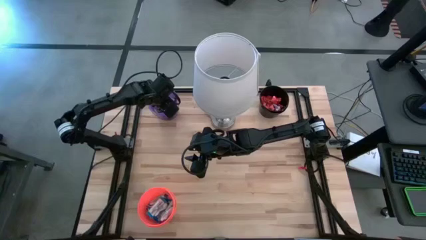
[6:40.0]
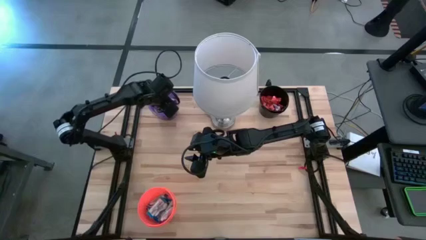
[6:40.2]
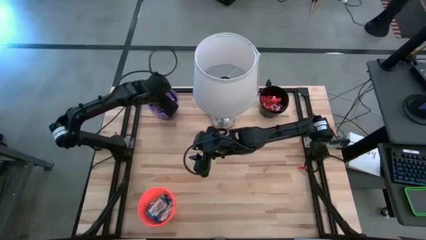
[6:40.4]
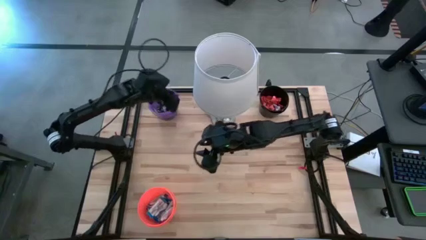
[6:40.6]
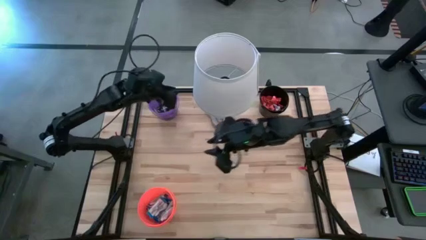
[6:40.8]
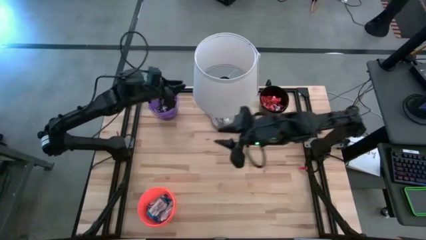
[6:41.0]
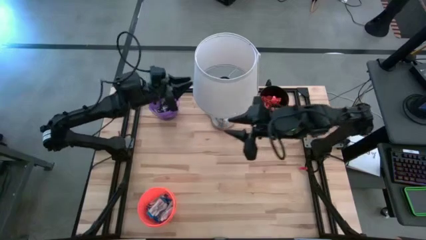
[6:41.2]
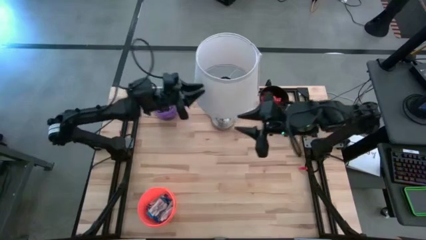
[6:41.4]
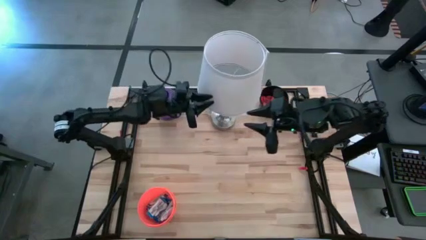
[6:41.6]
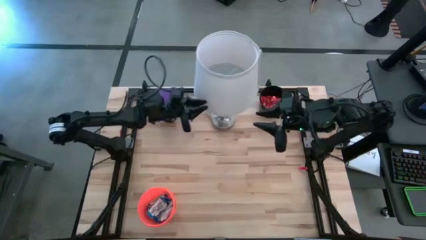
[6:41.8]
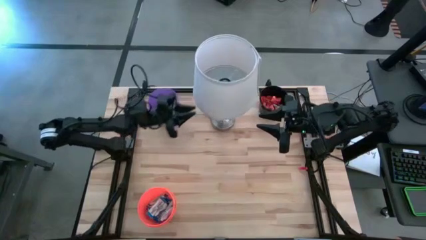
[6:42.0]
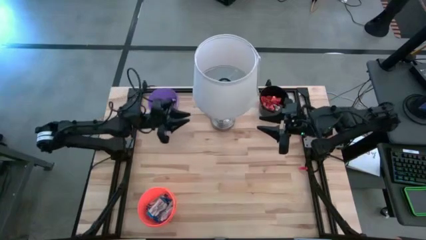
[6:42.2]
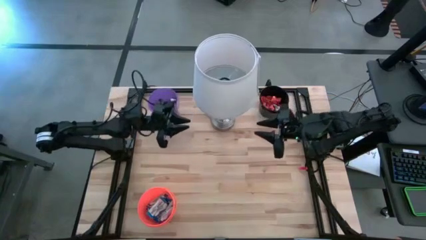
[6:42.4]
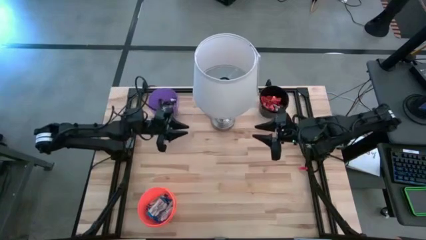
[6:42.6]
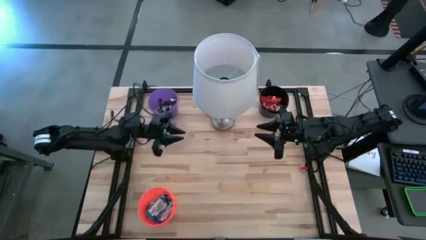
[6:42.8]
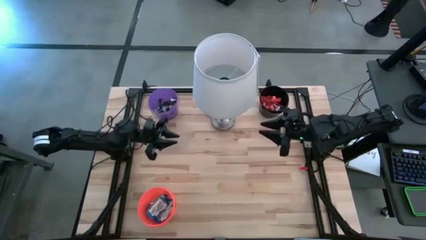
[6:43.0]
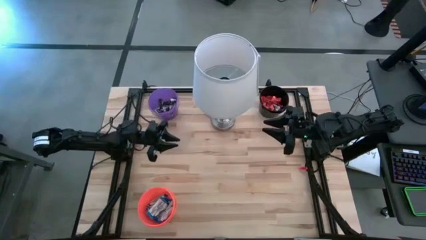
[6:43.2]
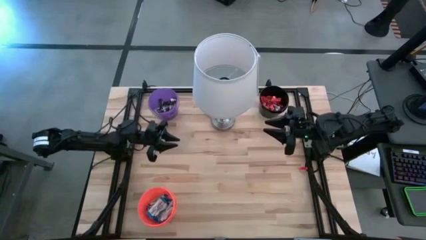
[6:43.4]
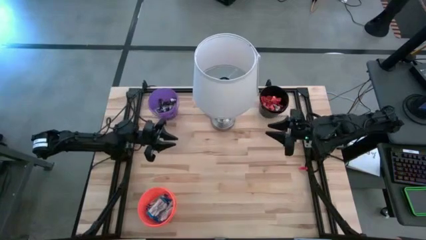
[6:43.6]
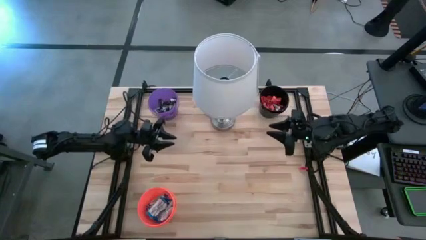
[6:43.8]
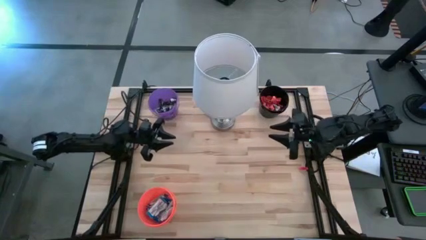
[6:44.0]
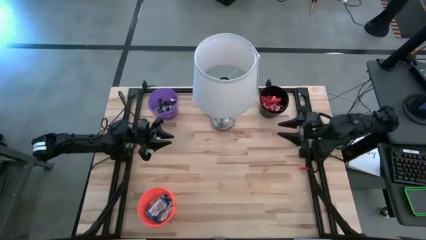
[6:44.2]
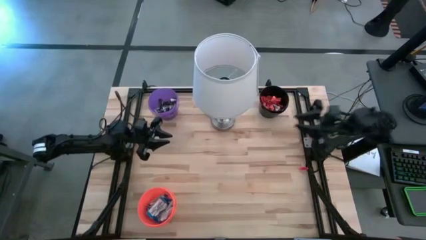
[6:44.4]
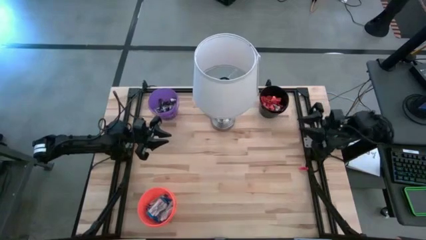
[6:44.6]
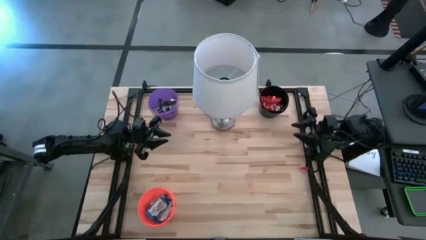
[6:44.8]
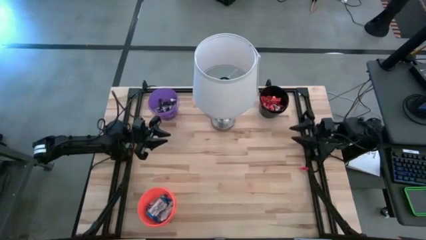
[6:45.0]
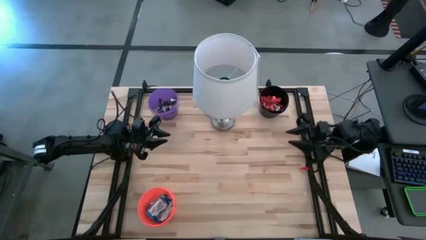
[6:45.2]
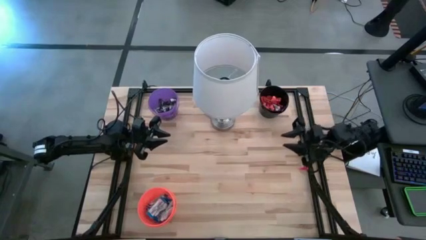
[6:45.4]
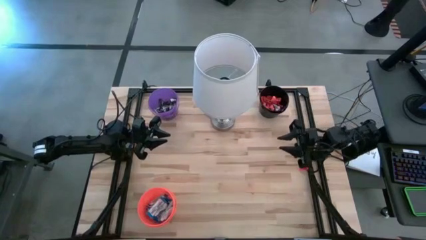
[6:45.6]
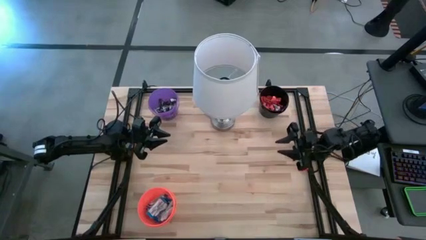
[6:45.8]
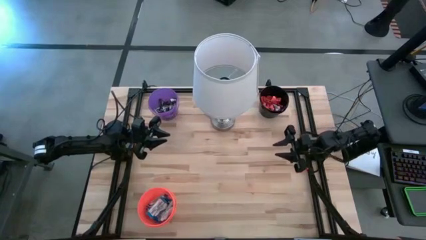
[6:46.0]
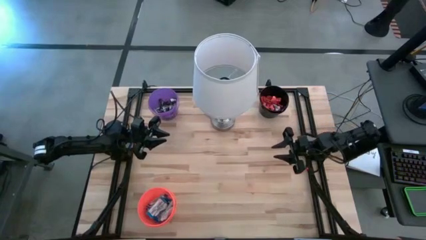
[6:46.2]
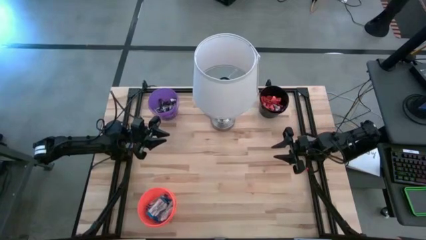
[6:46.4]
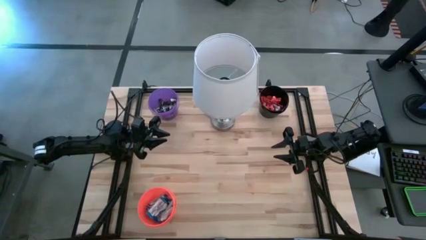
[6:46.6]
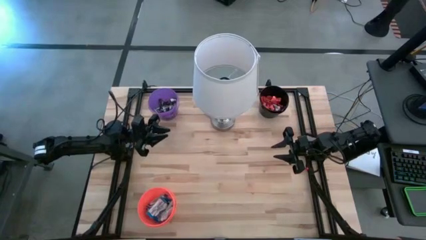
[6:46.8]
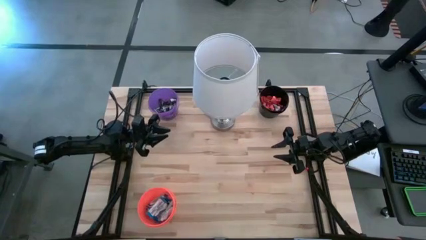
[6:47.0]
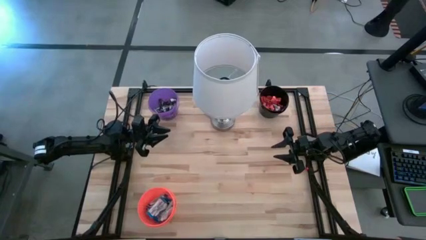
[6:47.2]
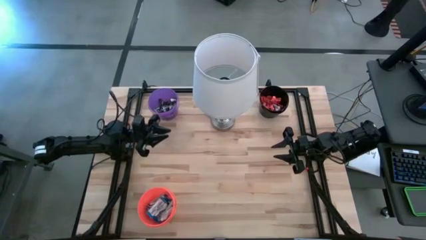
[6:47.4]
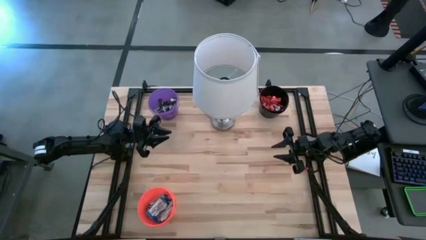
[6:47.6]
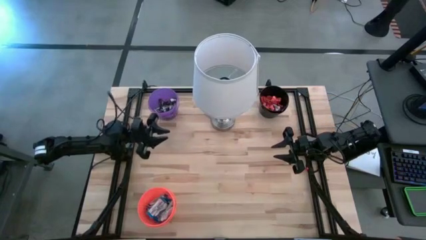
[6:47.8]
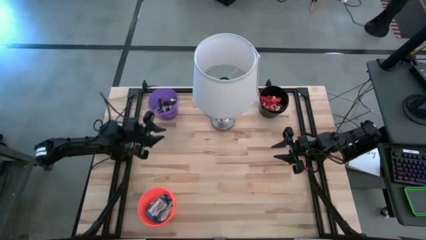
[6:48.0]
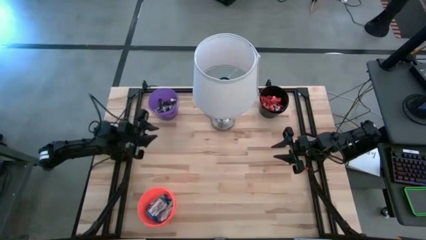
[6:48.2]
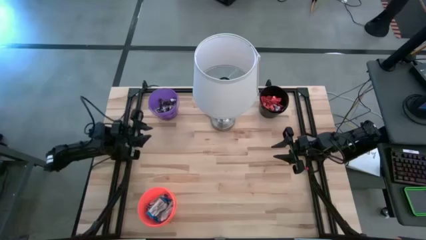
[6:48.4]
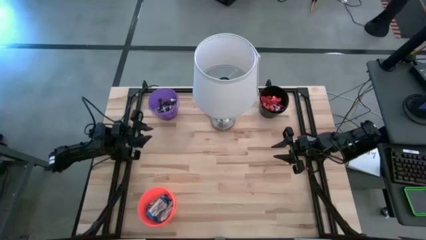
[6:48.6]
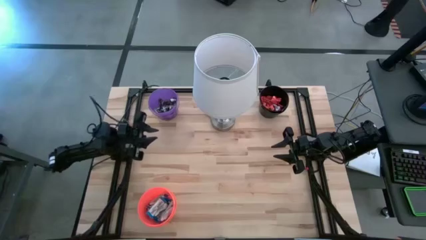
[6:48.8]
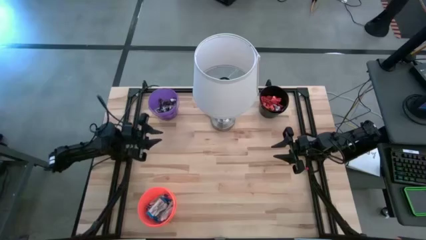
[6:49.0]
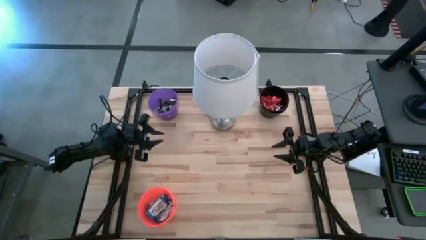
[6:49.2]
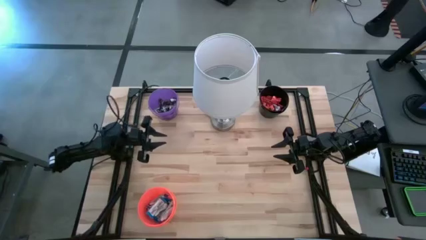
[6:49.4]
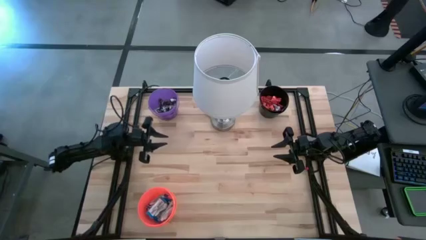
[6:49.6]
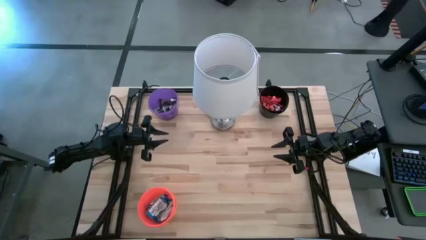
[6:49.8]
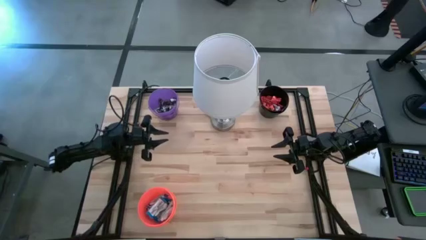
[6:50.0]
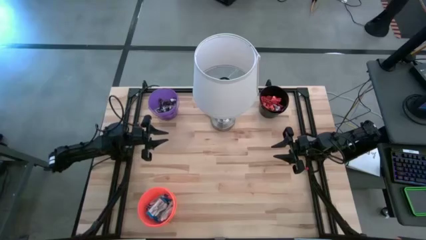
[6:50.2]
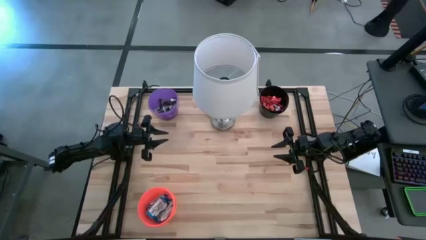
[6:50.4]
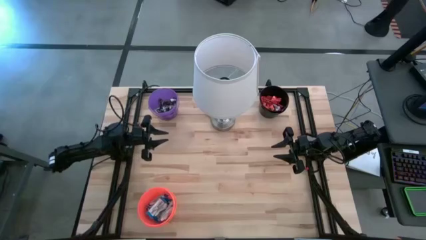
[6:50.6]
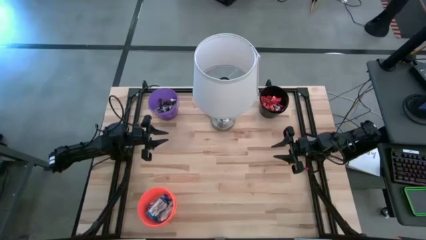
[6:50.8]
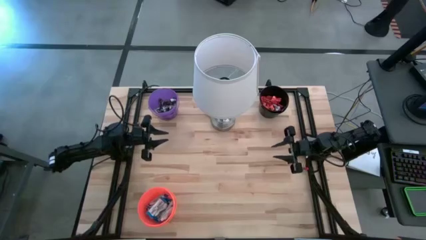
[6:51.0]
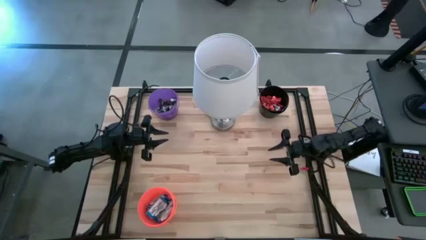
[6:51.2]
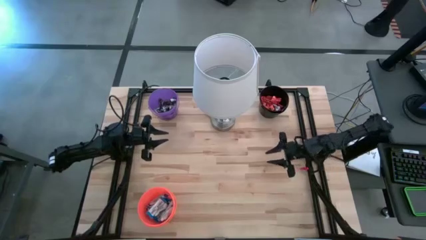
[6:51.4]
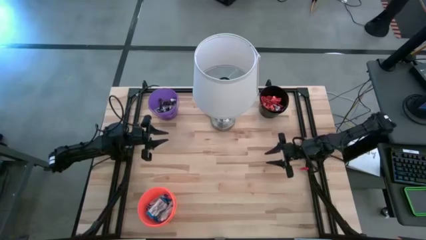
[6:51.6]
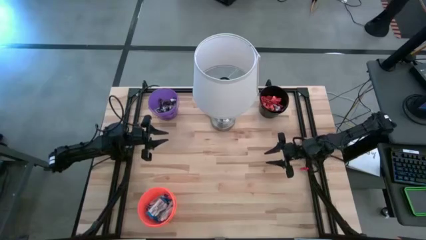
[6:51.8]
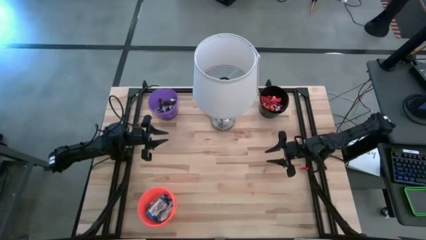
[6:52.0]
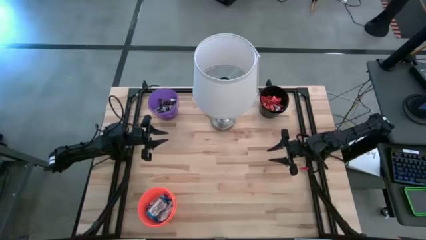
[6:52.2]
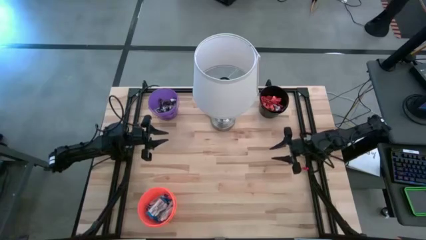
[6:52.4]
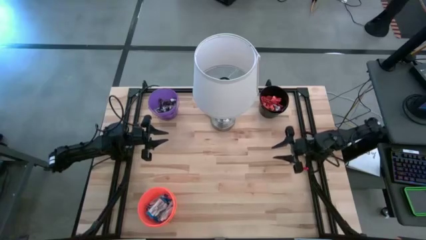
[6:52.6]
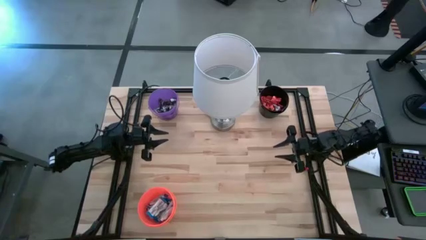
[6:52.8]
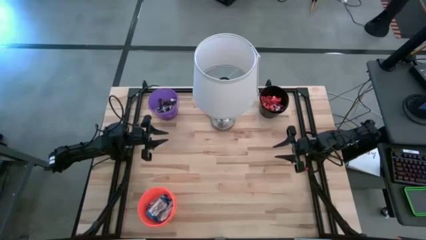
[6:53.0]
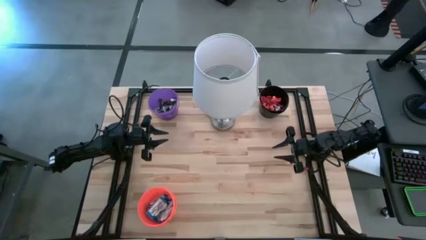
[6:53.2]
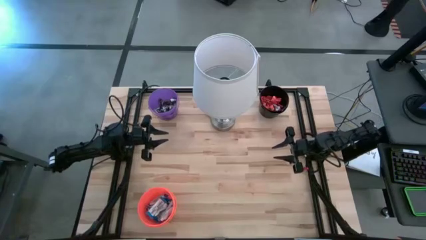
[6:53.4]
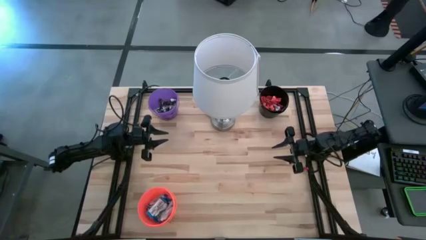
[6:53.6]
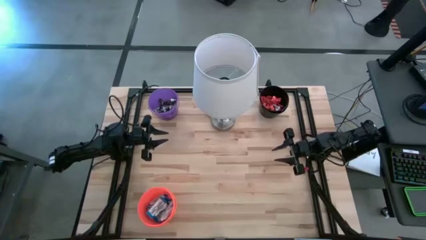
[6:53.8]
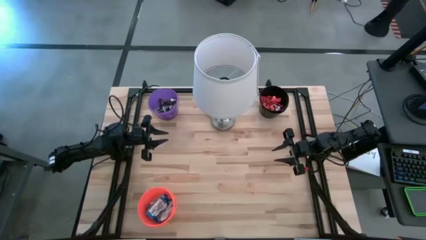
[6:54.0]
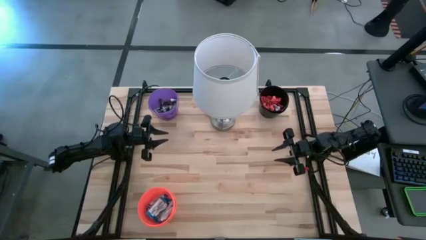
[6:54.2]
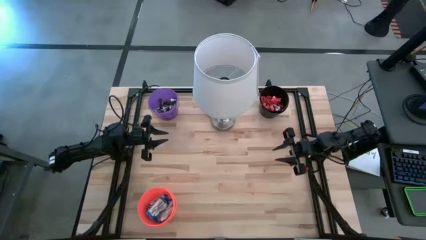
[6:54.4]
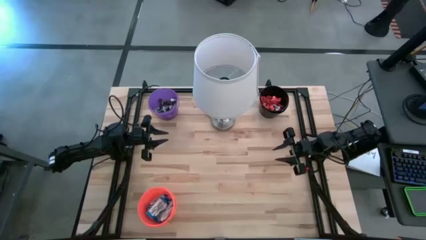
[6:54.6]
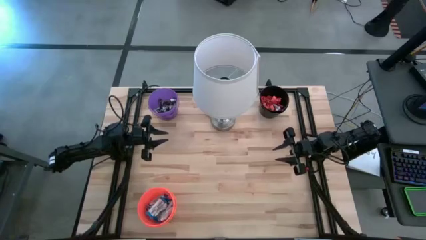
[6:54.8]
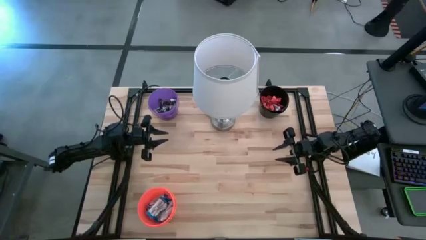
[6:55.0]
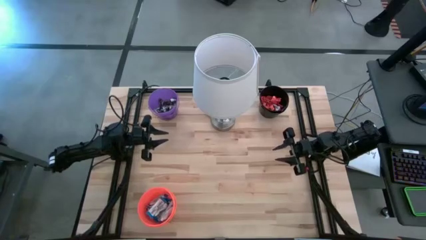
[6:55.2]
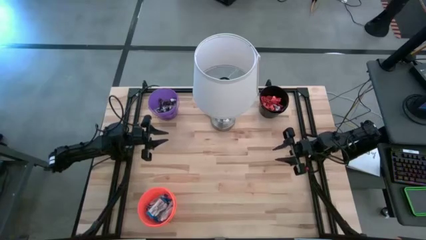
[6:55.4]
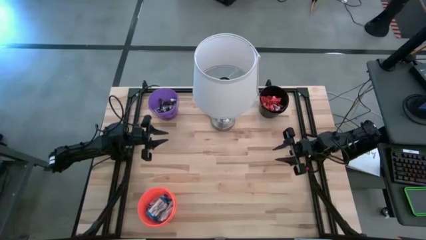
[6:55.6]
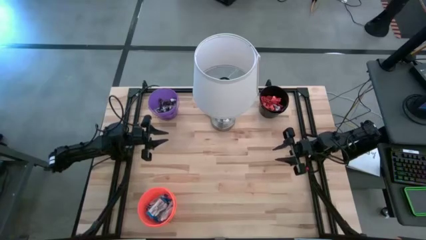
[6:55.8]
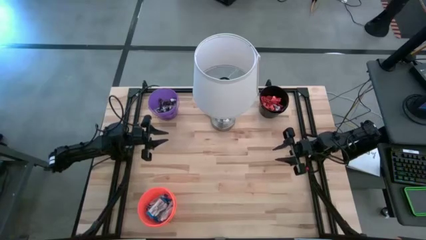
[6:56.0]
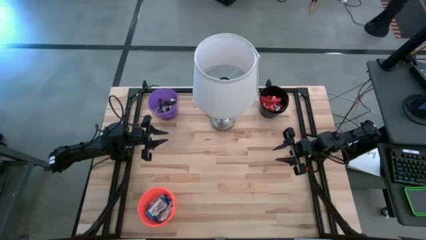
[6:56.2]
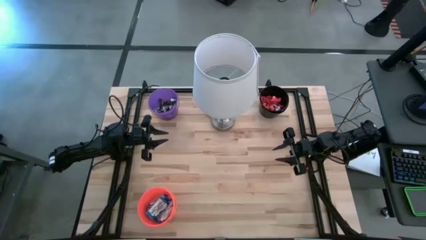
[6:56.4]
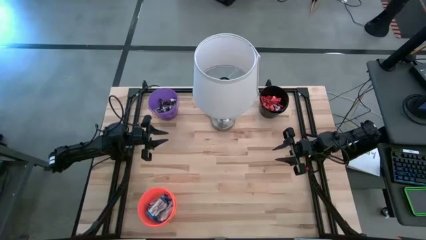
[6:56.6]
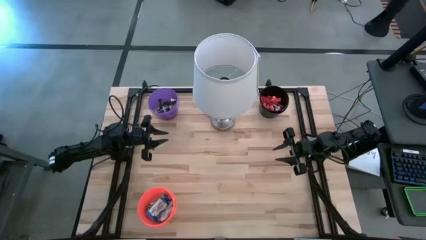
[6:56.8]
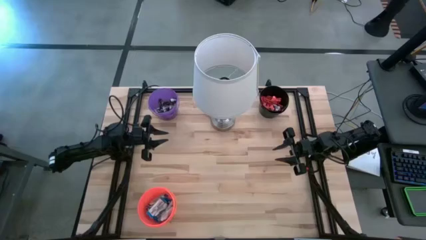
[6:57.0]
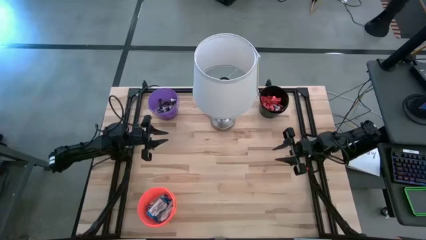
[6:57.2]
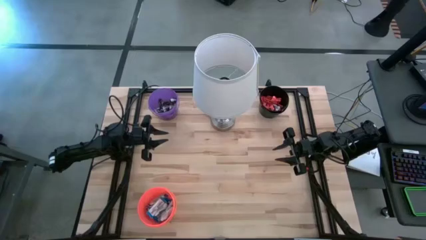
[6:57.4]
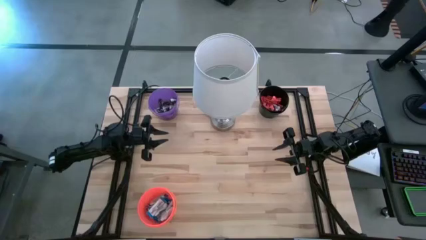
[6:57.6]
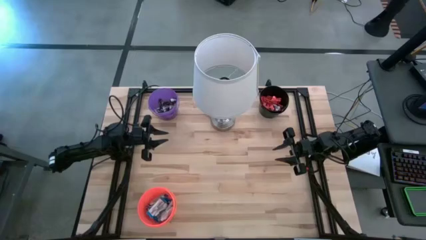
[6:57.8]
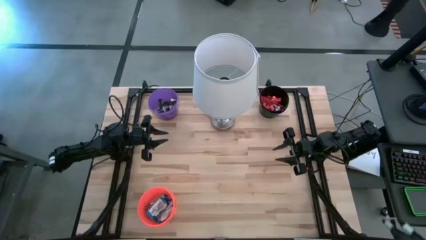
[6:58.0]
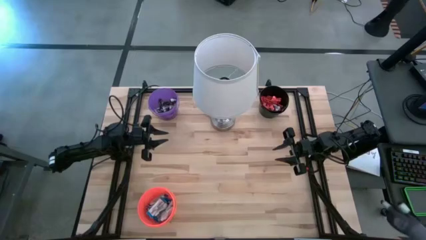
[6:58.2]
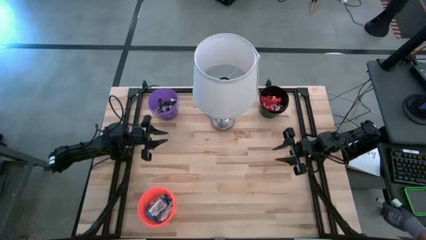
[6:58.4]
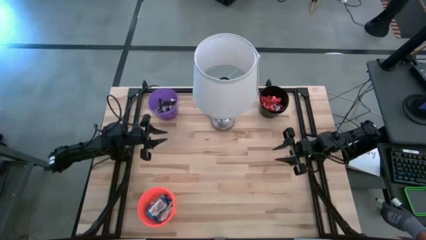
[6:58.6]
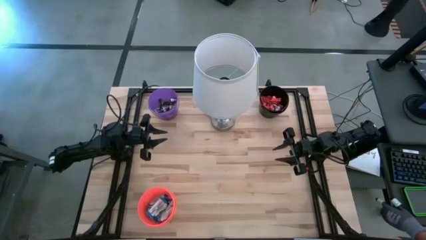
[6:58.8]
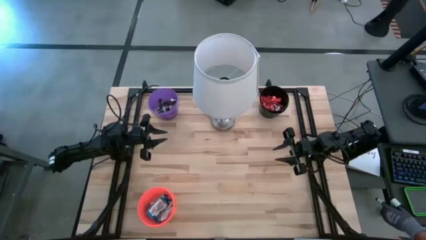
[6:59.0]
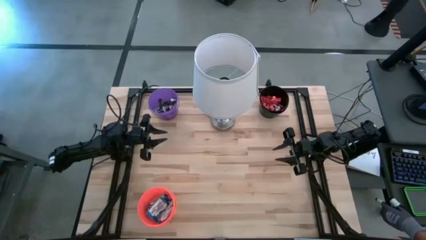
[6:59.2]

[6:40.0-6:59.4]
Task: Organize candy in baskets
Return to Home Position
